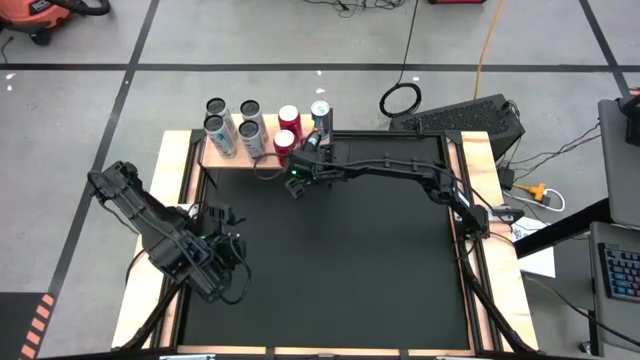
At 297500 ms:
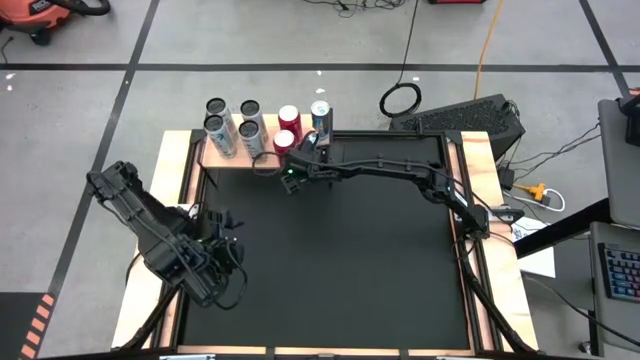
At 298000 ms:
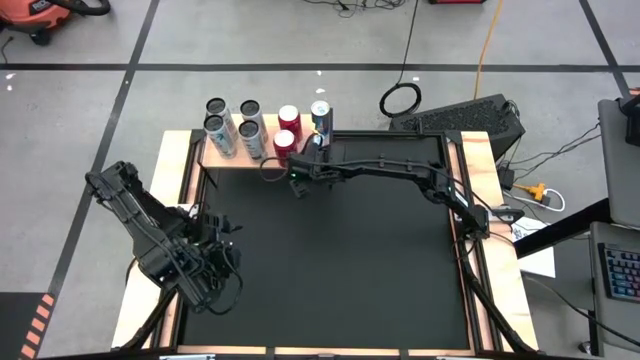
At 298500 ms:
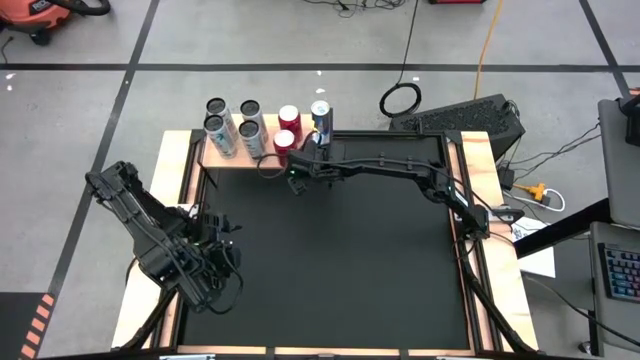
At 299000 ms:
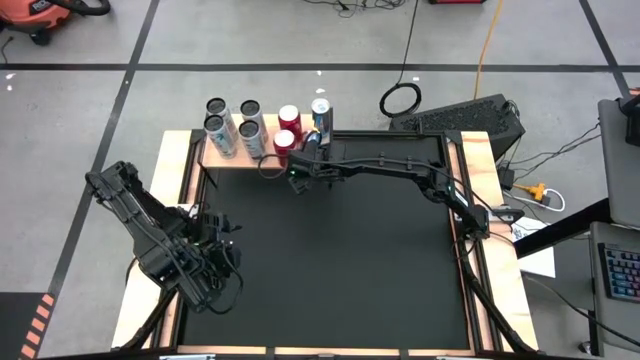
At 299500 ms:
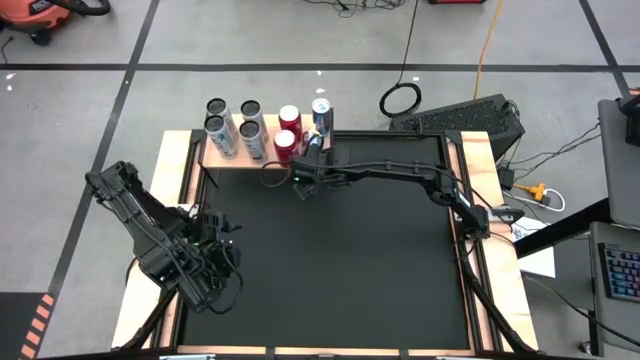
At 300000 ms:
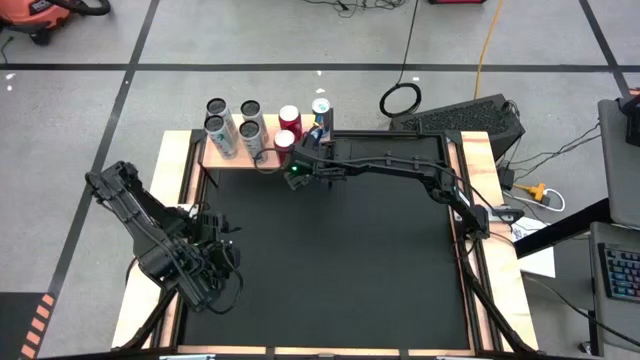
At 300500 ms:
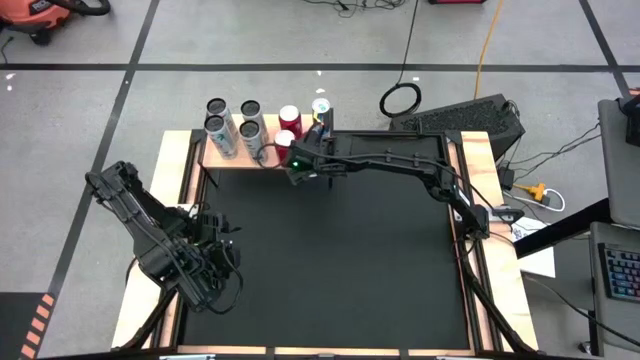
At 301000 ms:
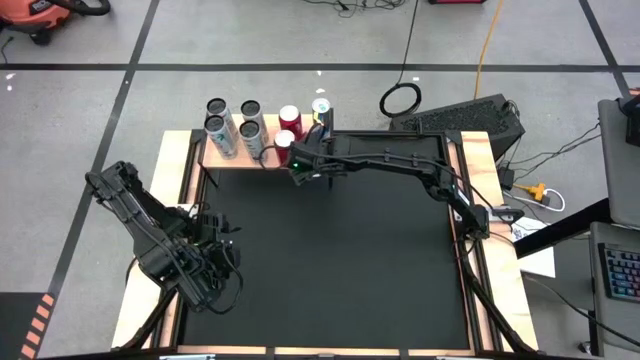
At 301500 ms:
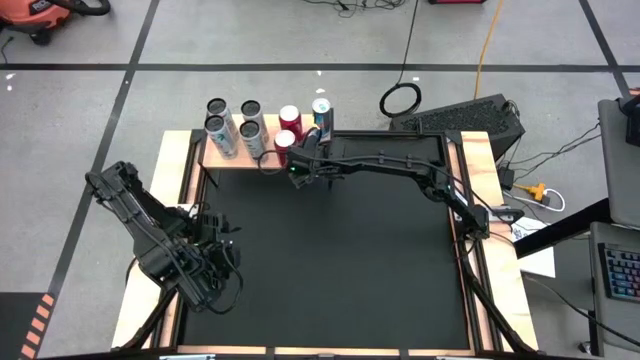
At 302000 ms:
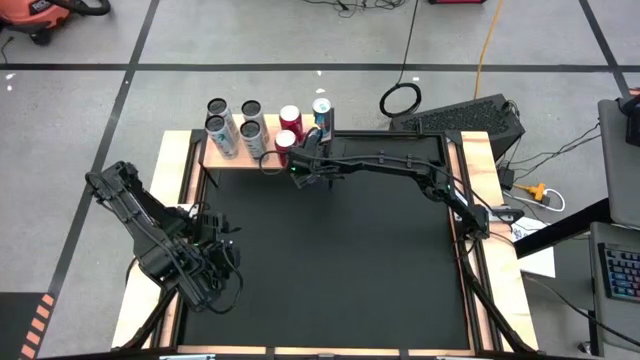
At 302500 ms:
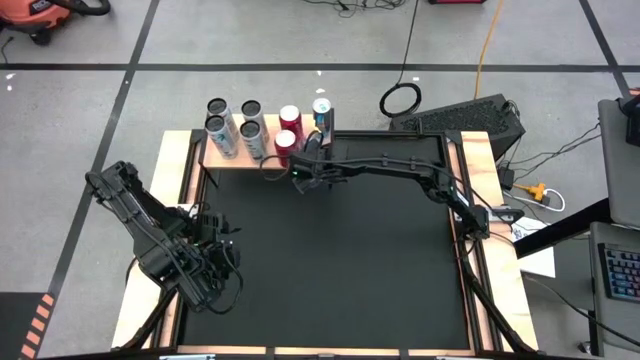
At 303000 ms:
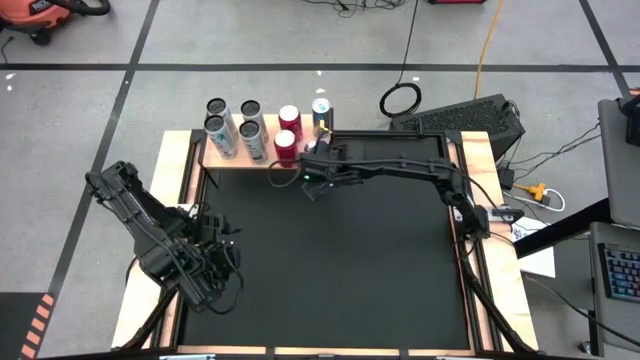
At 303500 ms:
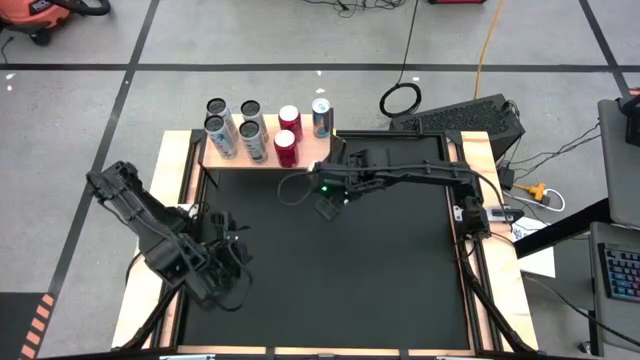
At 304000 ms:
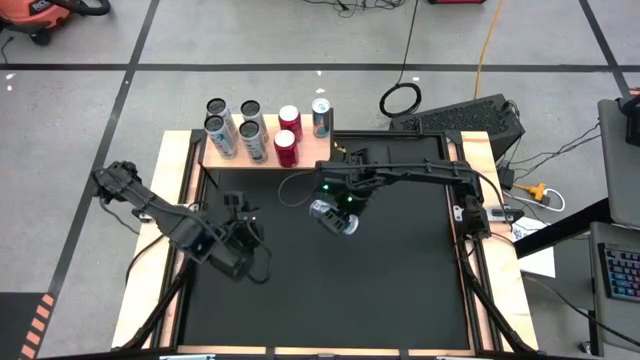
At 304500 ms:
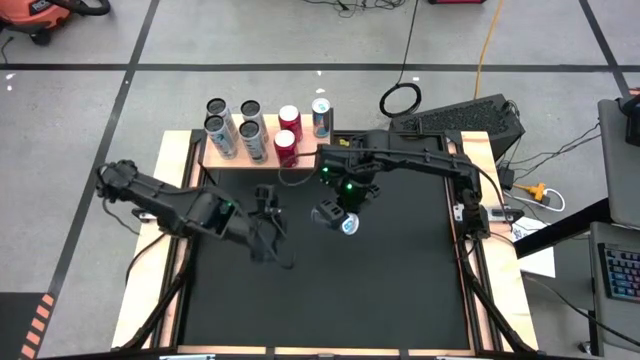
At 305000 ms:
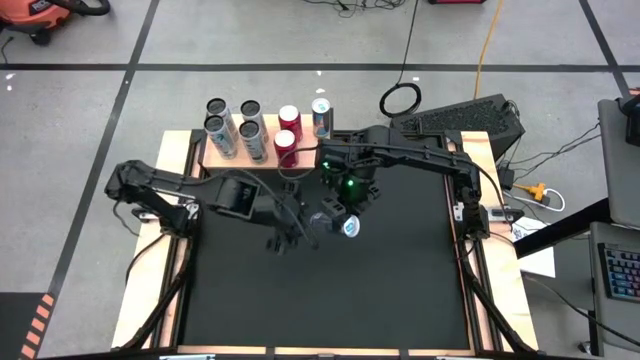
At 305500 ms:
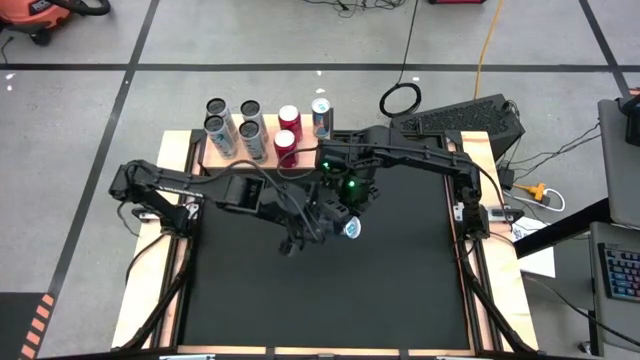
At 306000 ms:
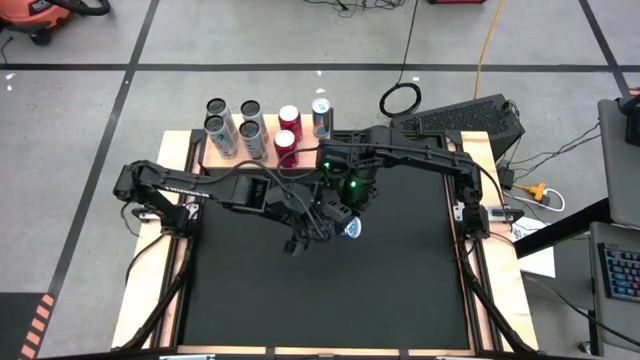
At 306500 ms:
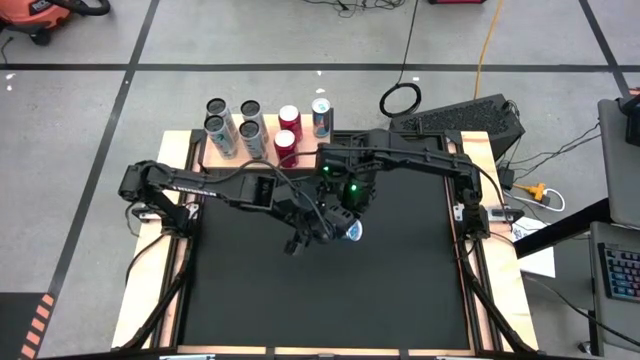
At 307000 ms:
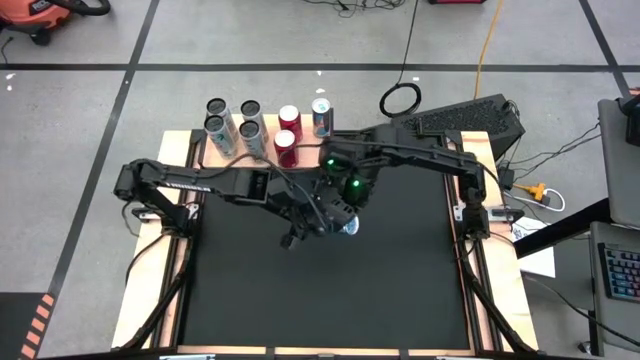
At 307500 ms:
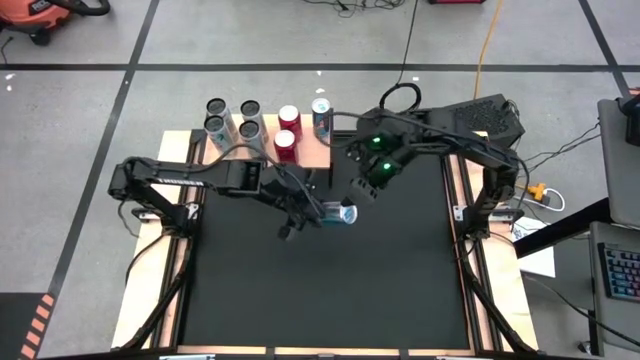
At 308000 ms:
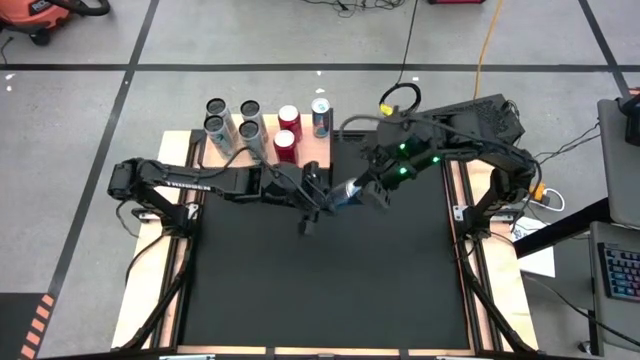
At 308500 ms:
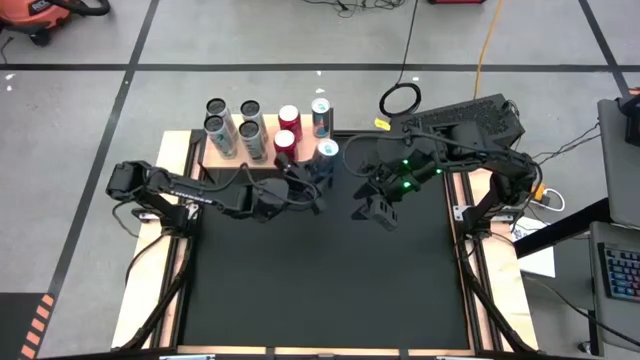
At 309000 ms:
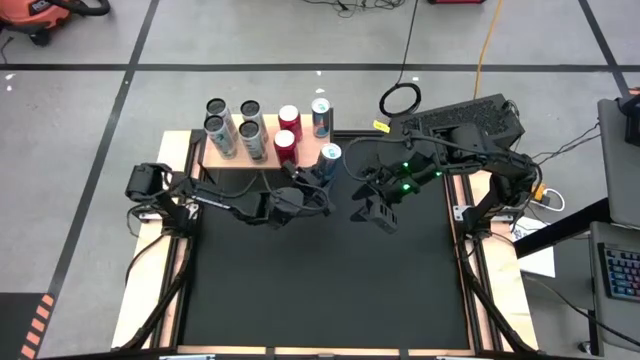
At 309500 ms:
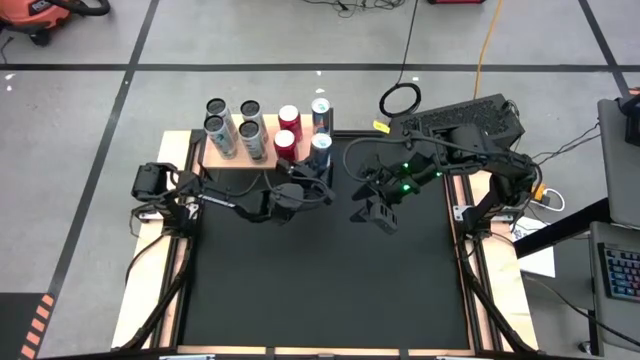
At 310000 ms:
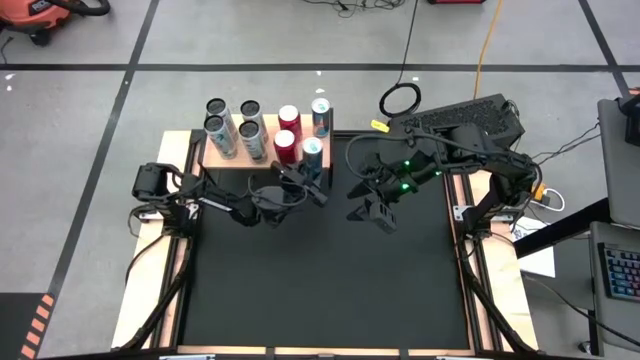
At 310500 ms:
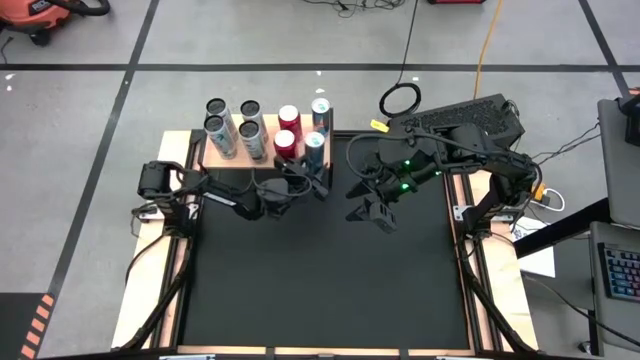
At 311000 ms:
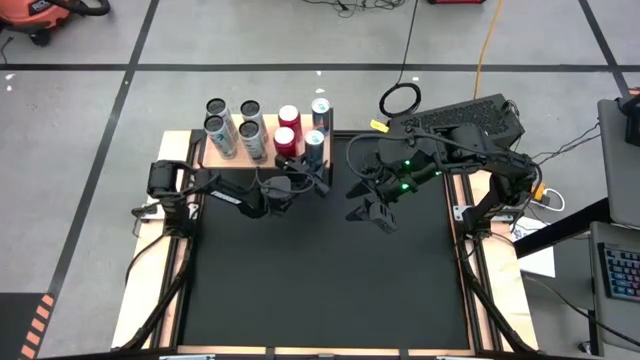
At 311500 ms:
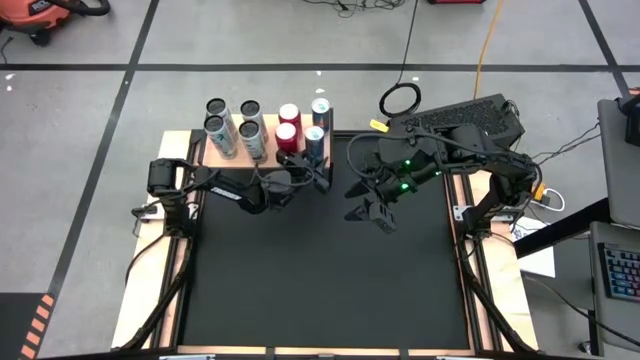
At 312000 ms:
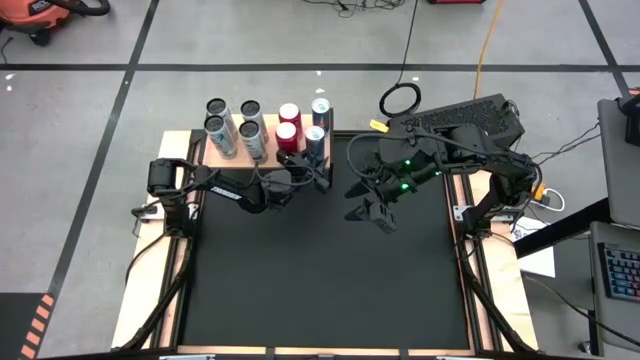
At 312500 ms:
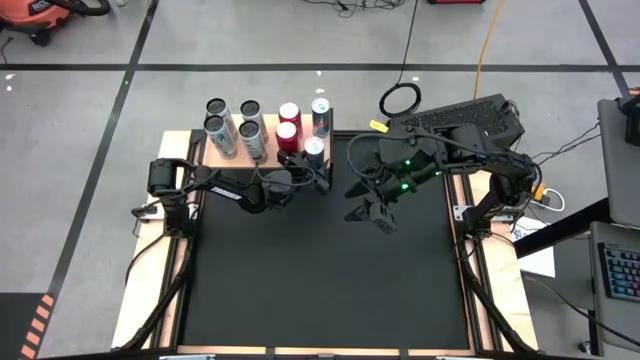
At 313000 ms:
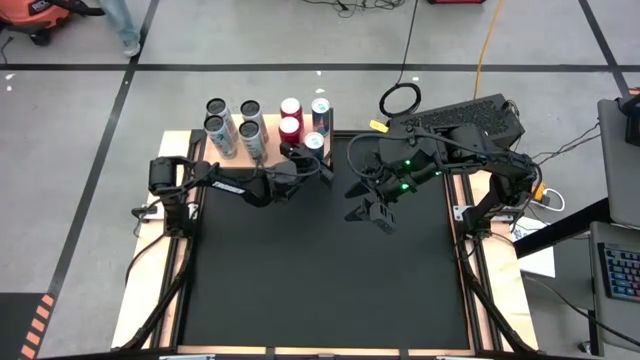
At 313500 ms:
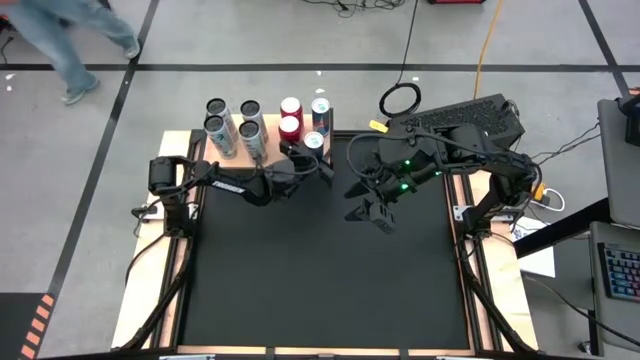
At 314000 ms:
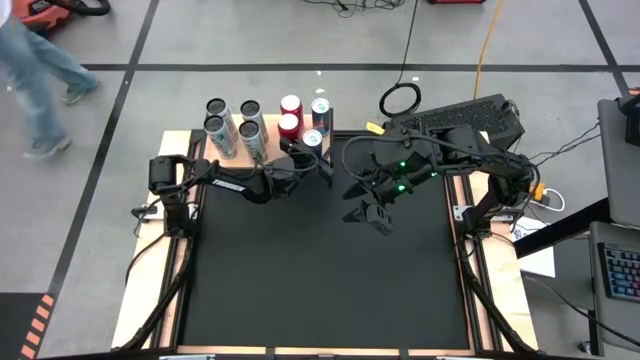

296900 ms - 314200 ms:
Task: Place canned beverage on shelf
Put the blue soda can aligned with the blue soda can on the shelf

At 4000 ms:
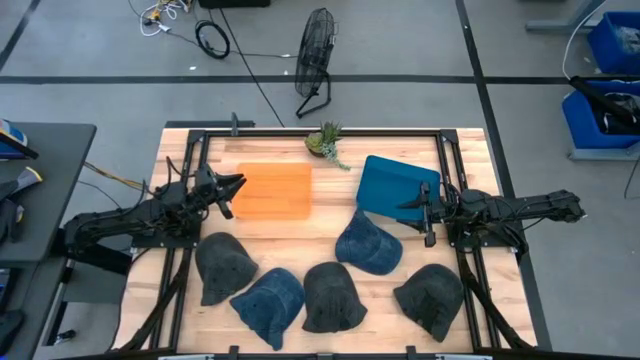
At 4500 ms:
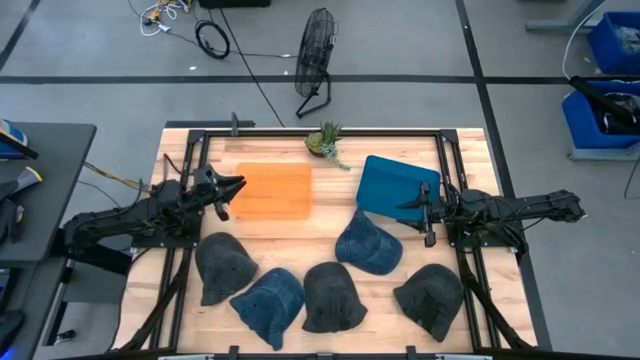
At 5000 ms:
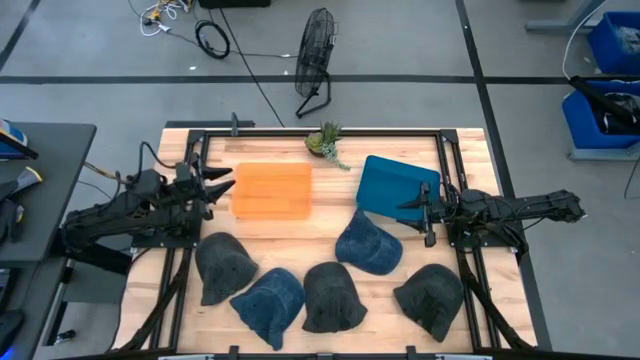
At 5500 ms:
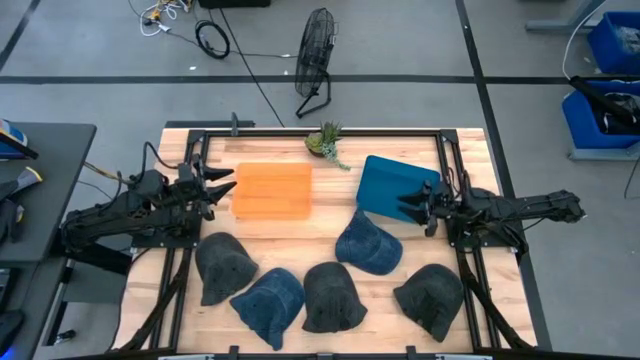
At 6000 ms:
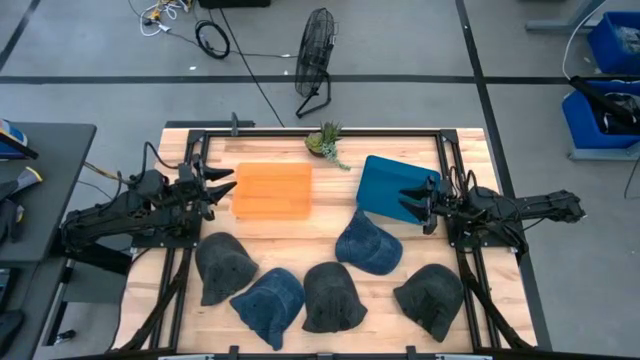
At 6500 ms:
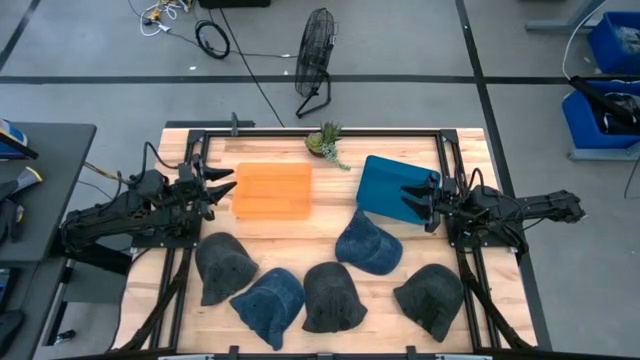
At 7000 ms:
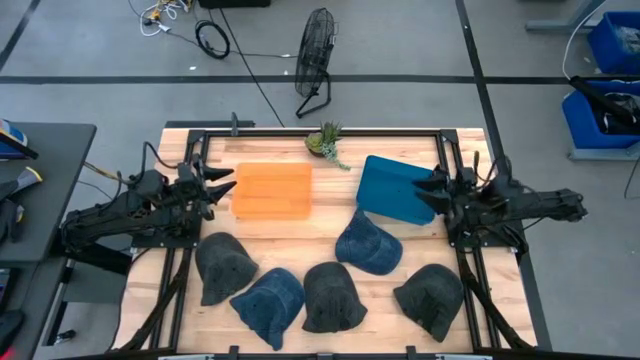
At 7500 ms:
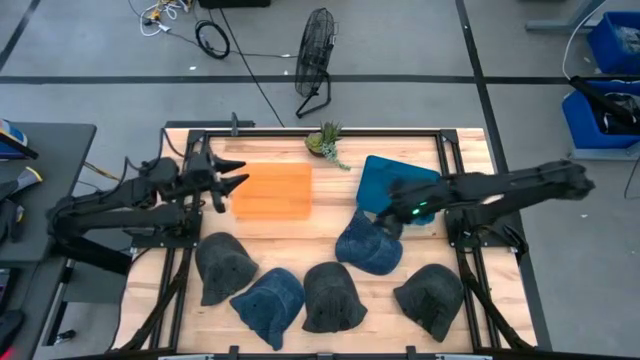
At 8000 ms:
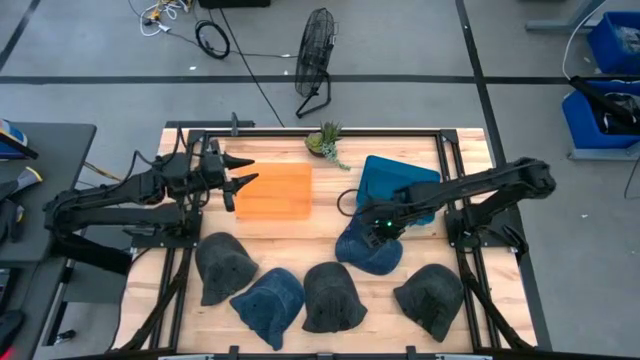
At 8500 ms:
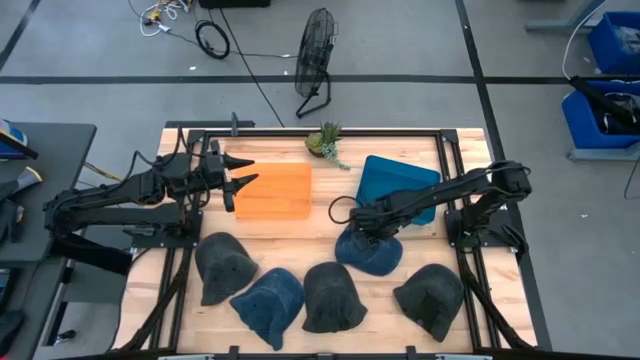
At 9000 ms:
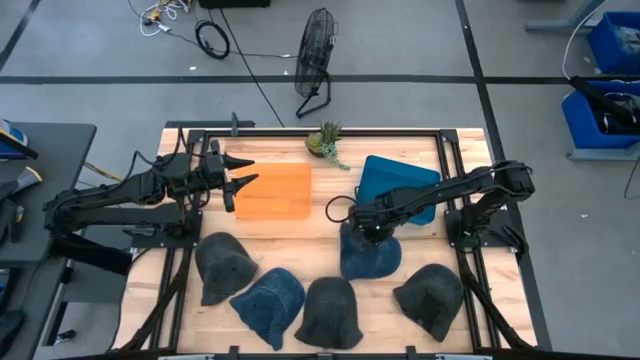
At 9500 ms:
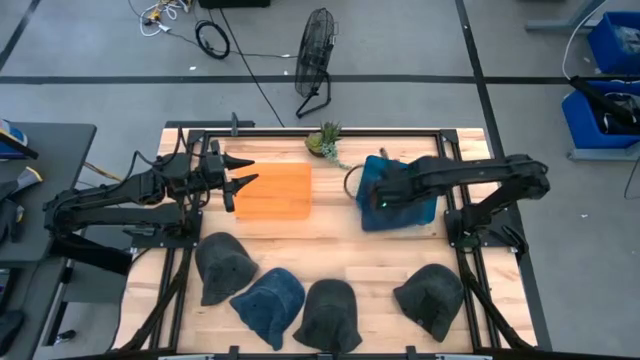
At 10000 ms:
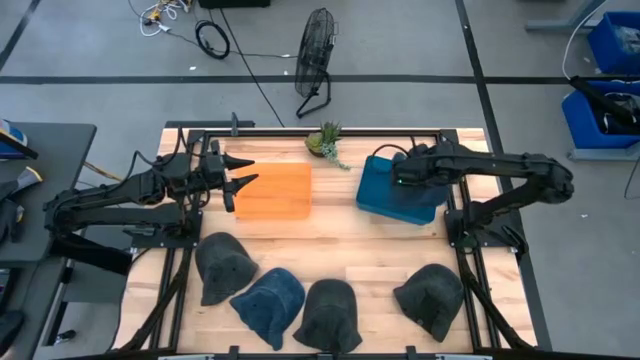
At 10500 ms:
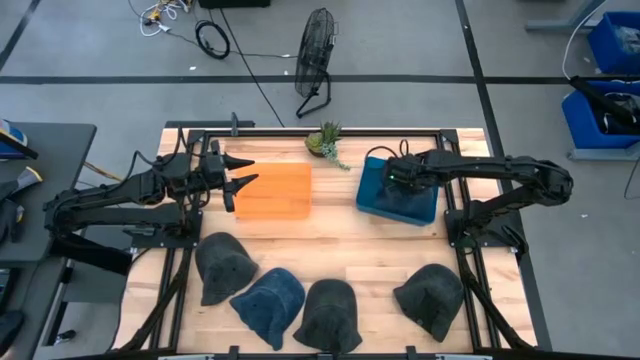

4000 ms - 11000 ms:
Task: Pick & Place hat
Put the top blue cap into the blue bin
